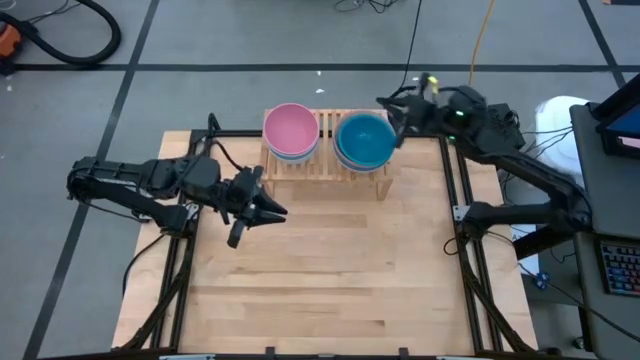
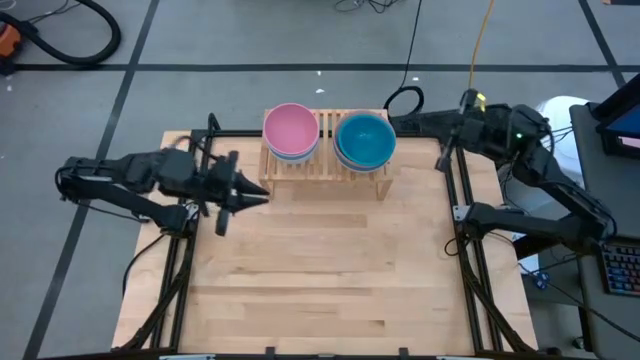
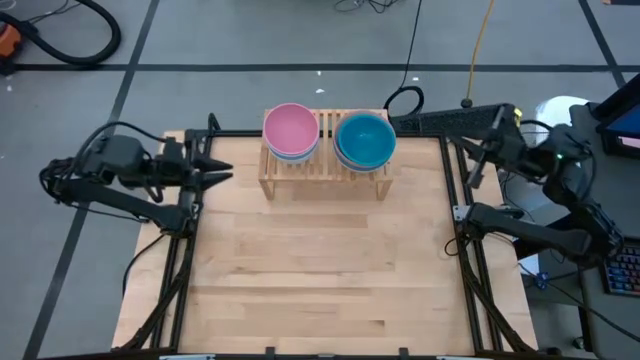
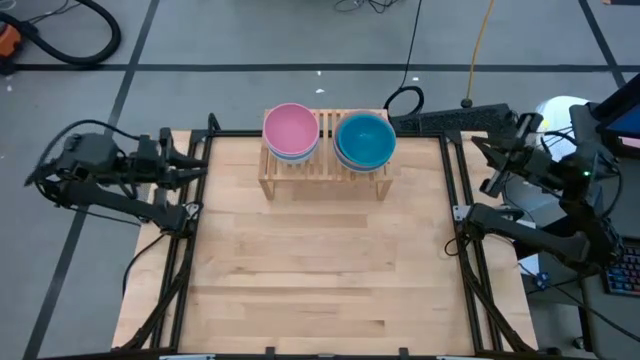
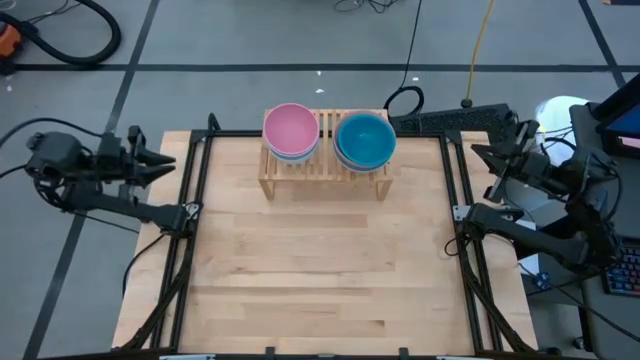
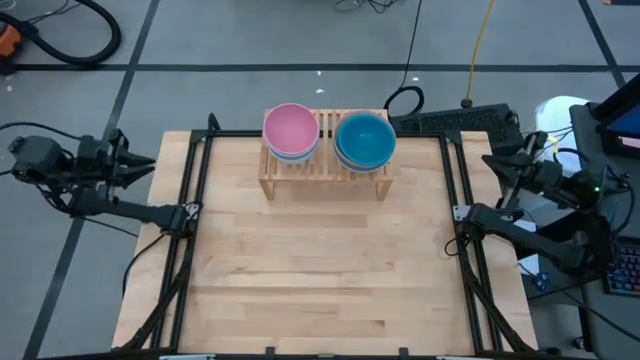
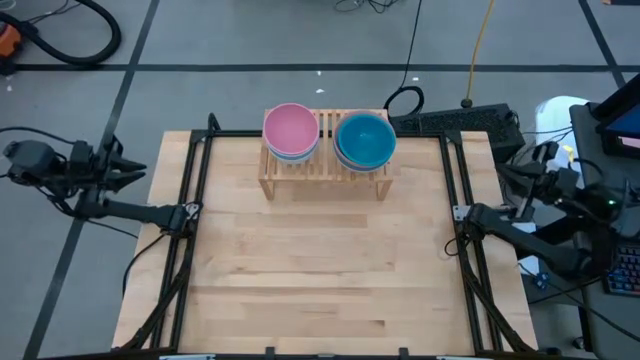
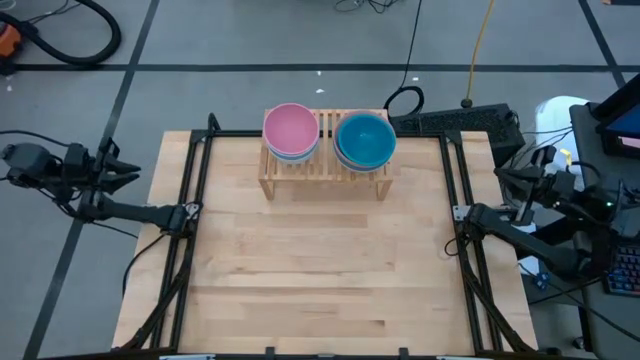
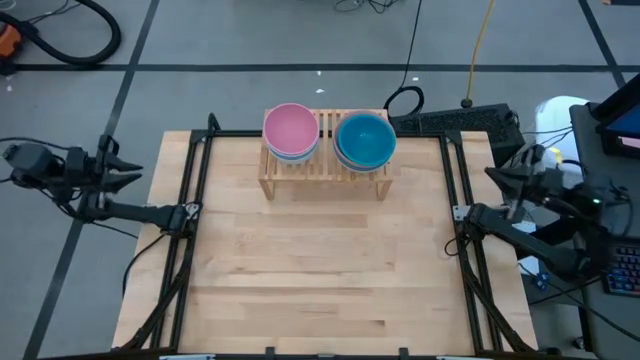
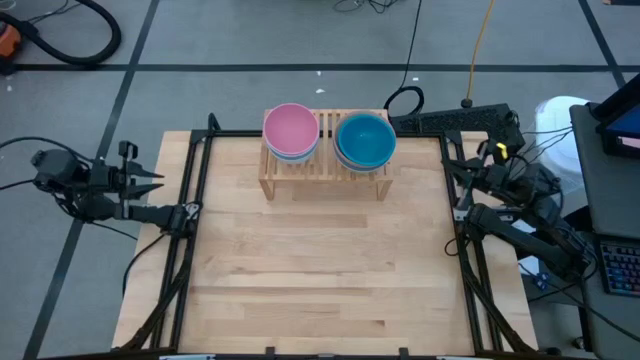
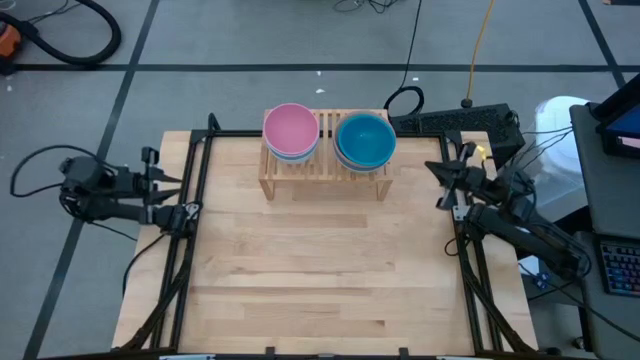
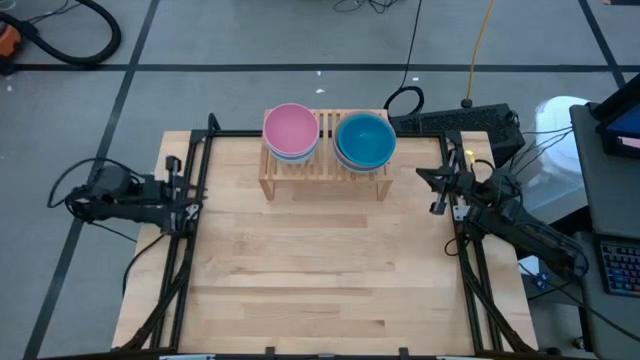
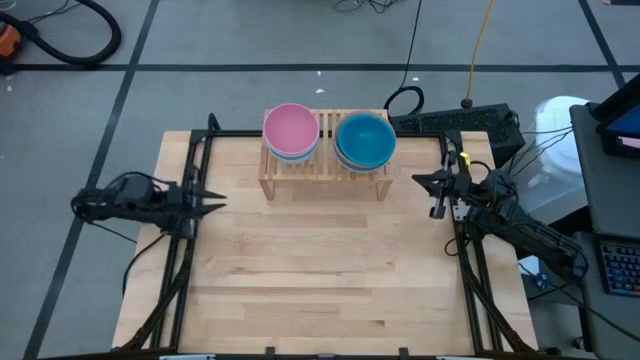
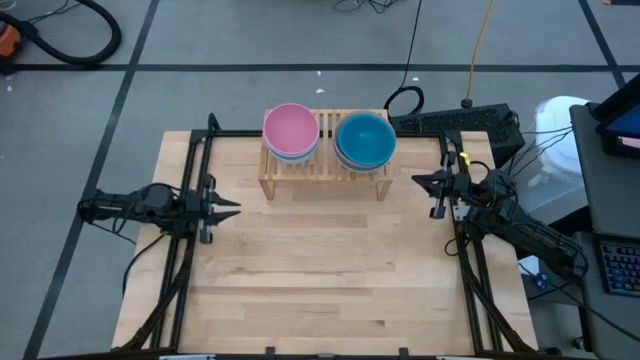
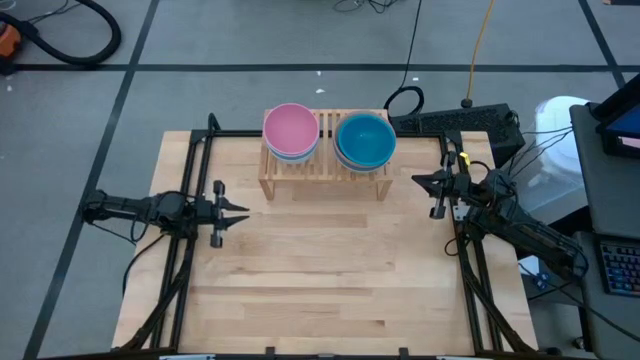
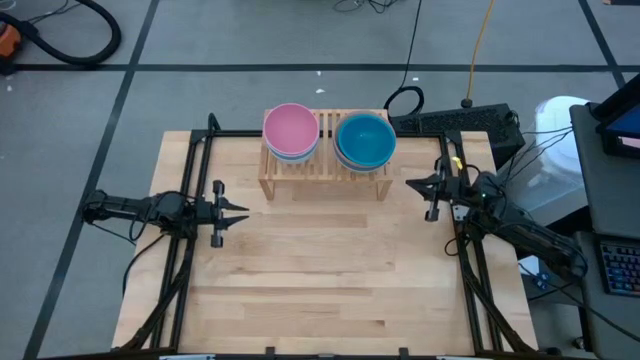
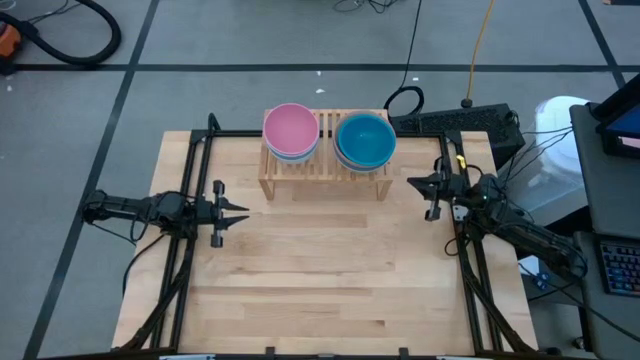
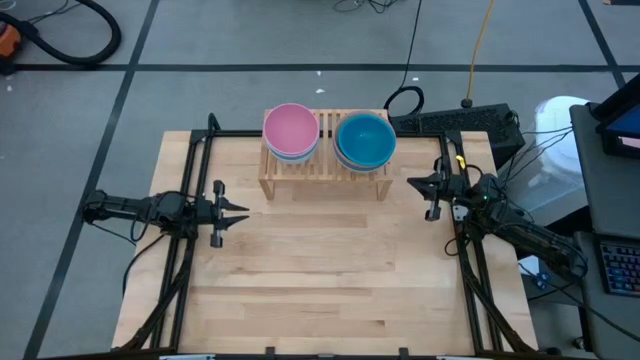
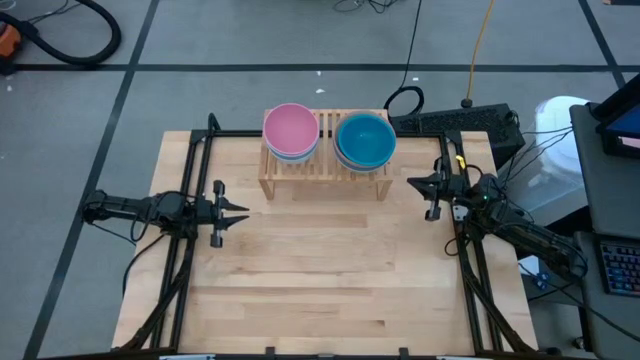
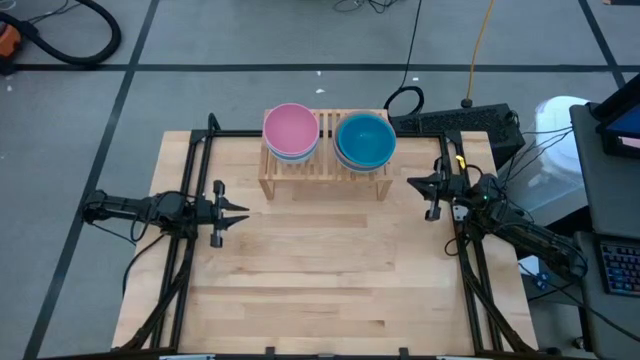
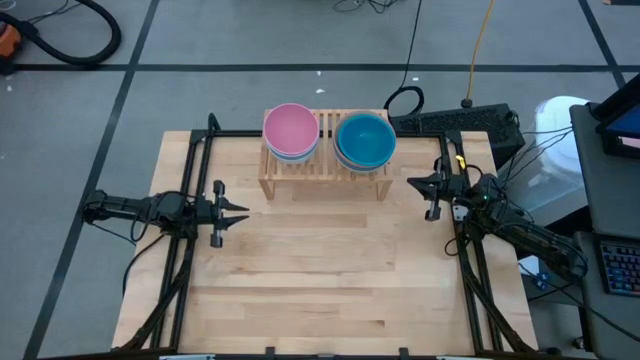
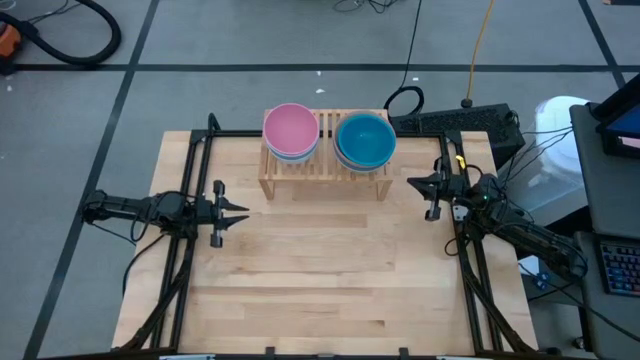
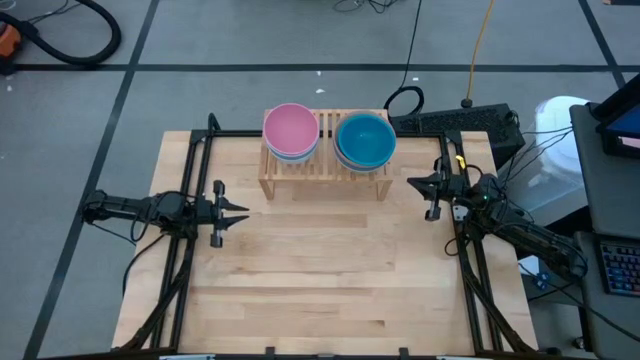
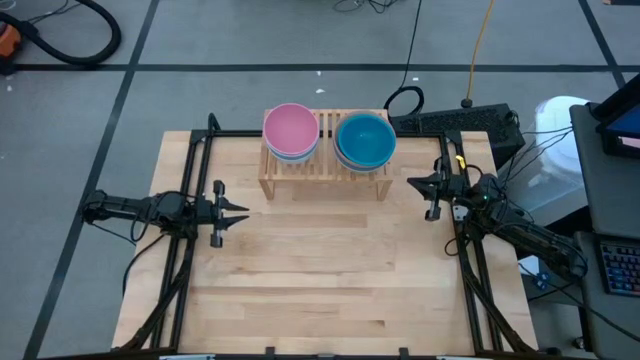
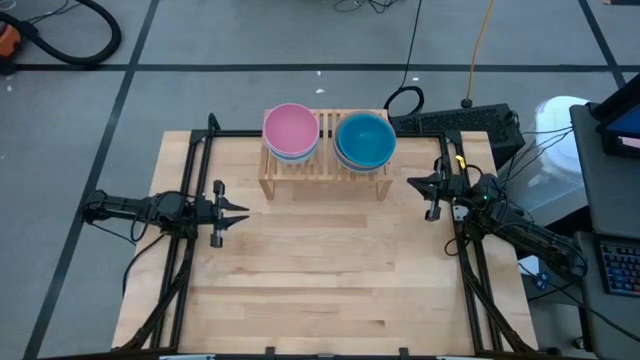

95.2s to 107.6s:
Task: Place and stack bowls onto a shelf
Return to Home Position

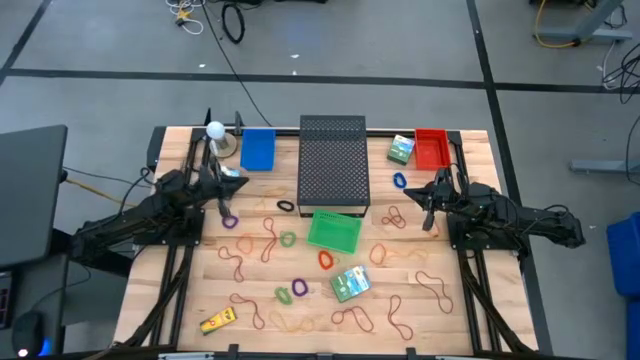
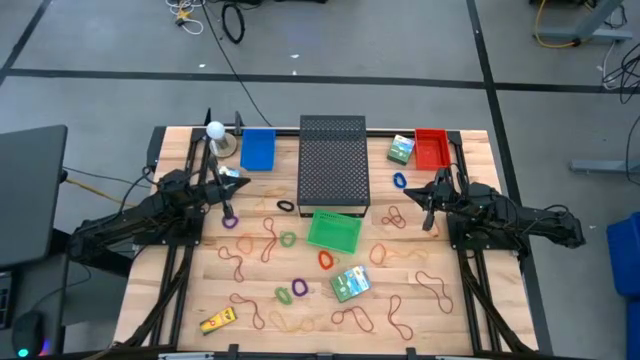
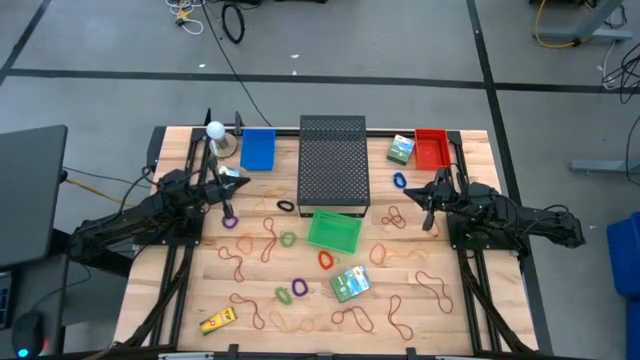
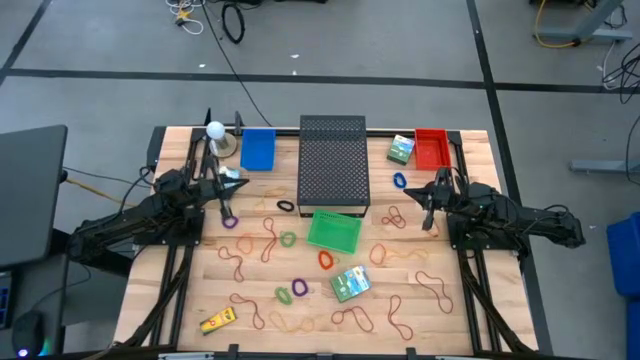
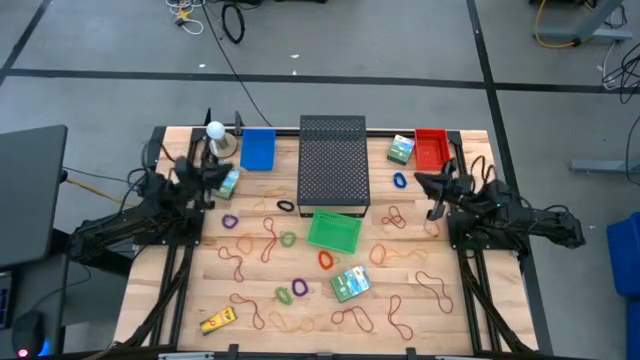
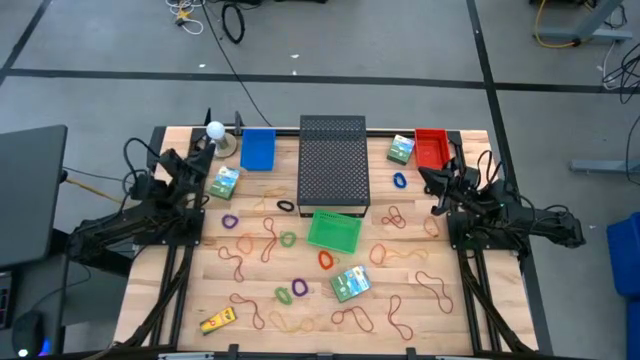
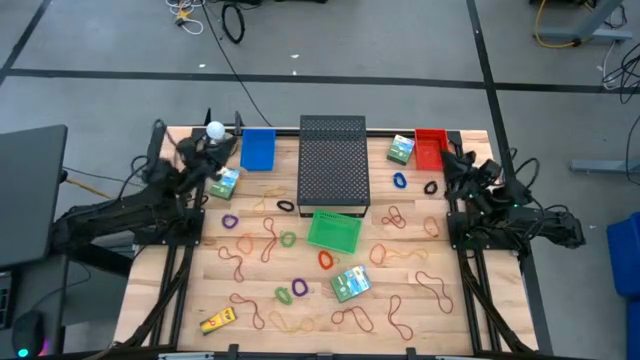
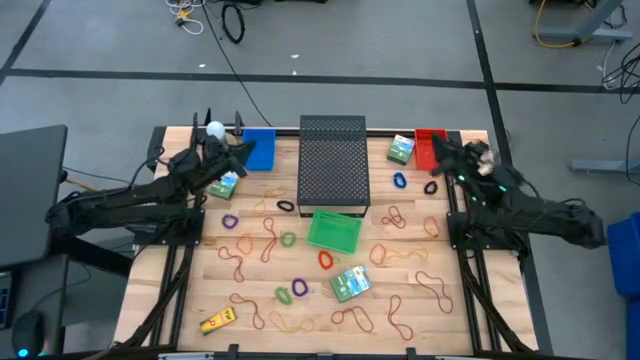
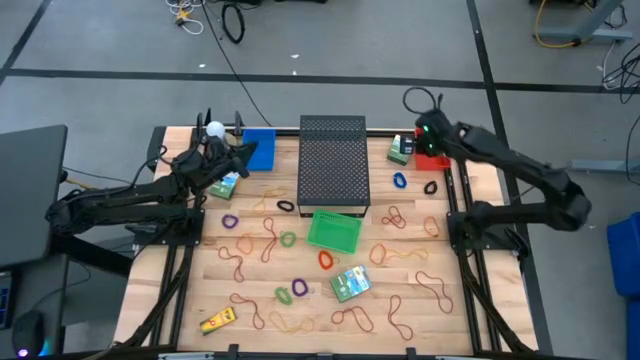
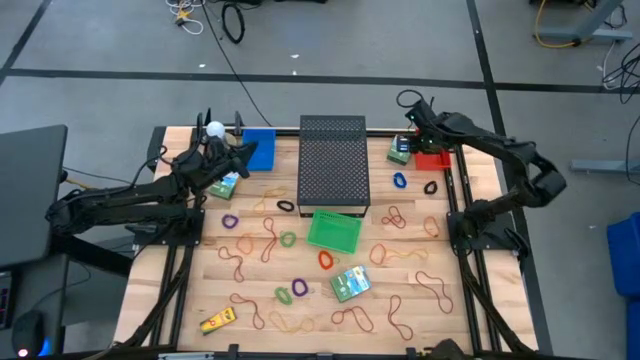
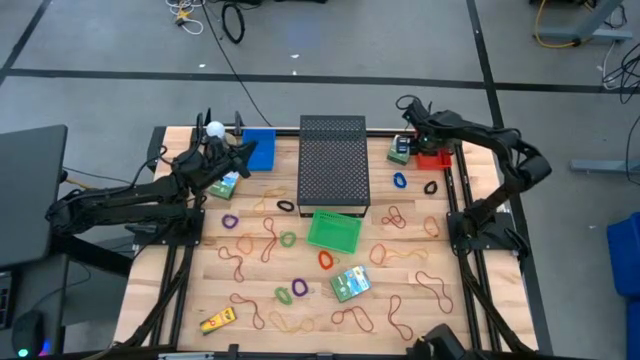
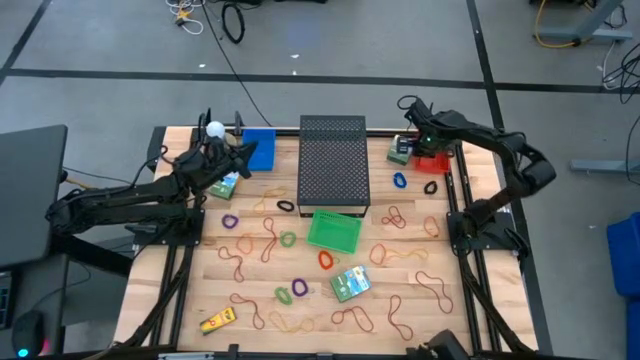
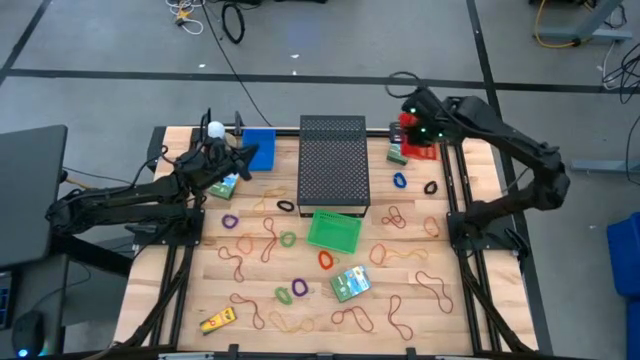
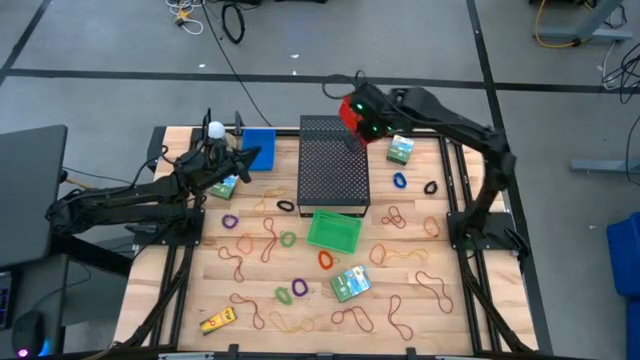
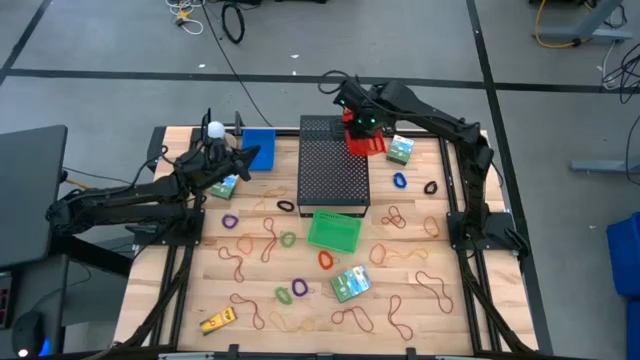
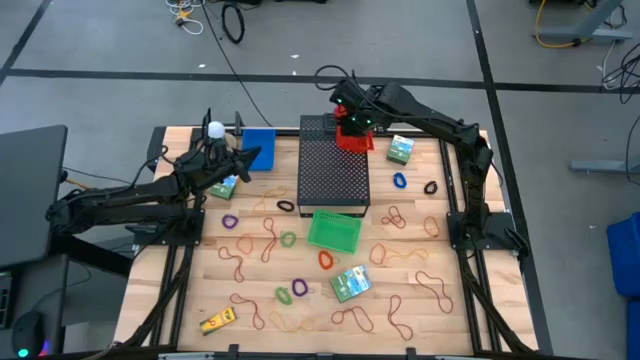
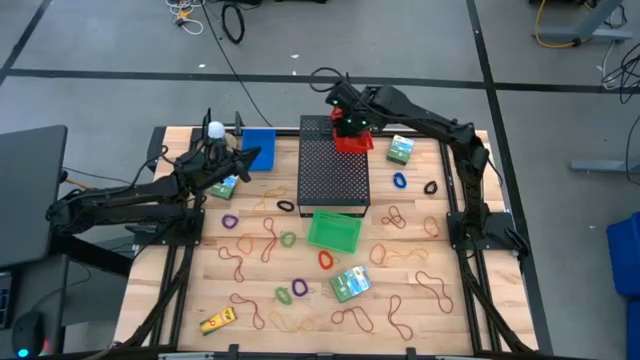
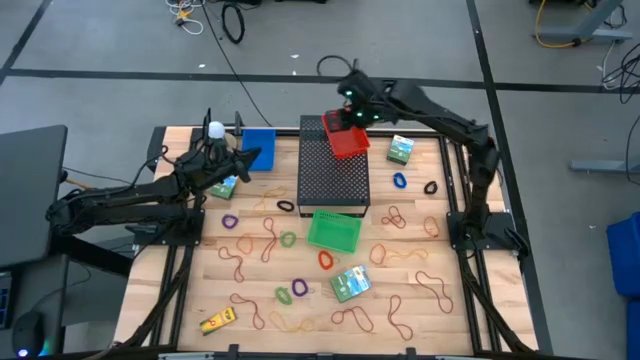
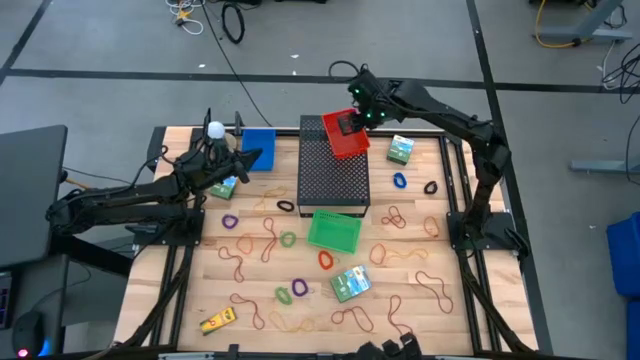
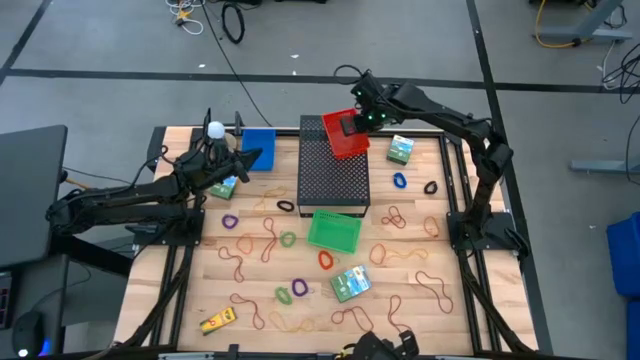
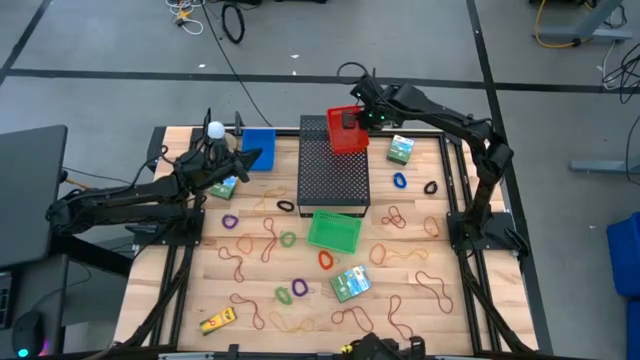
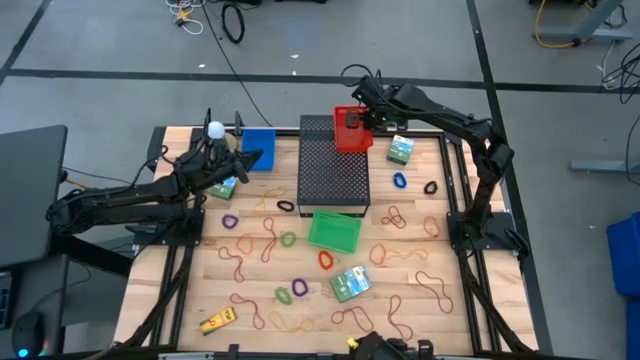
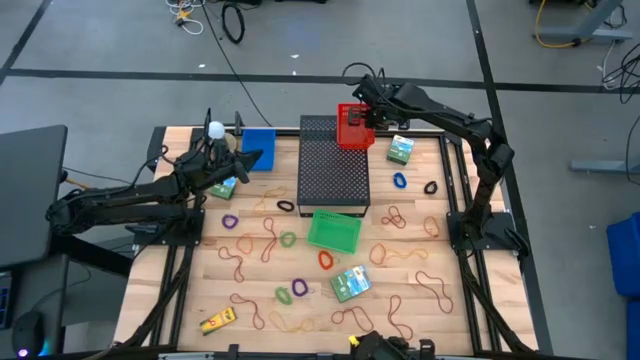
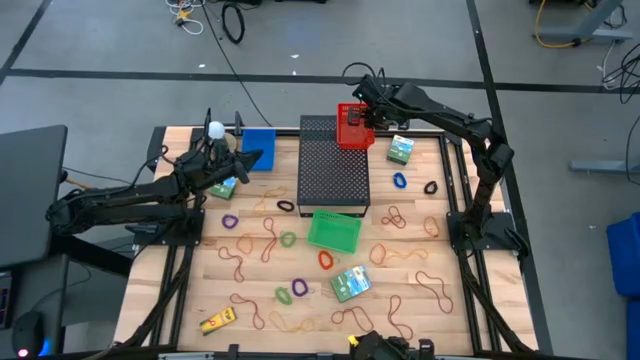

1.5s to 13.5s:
Task: Pick & Place Office Desk Supplies
Put the red bin on the shelf
